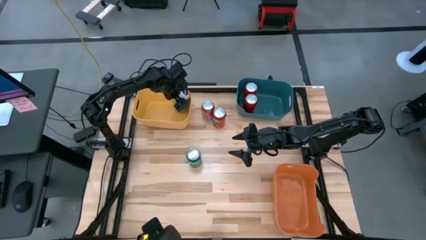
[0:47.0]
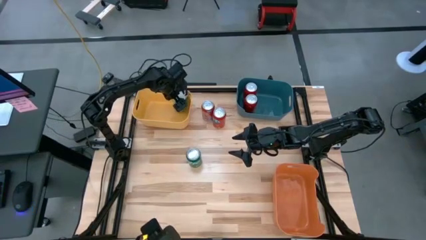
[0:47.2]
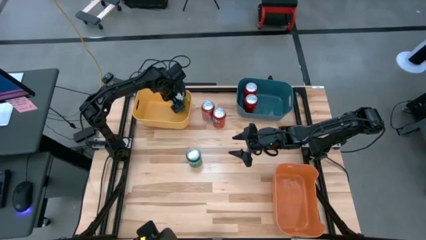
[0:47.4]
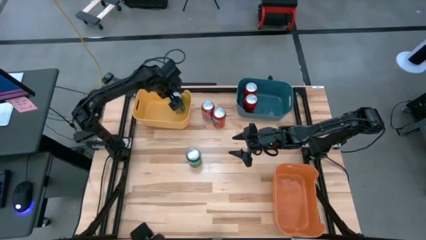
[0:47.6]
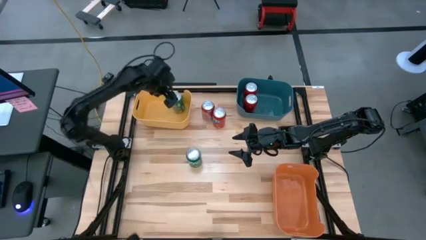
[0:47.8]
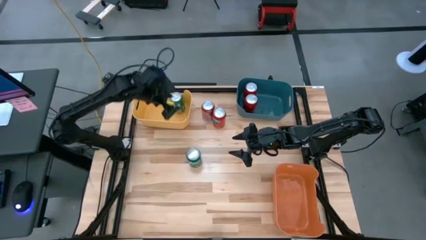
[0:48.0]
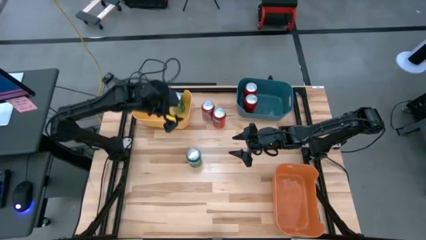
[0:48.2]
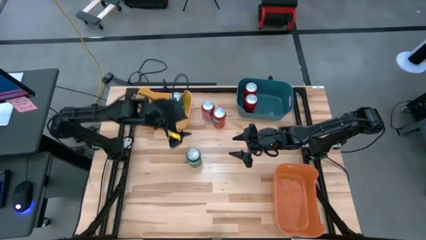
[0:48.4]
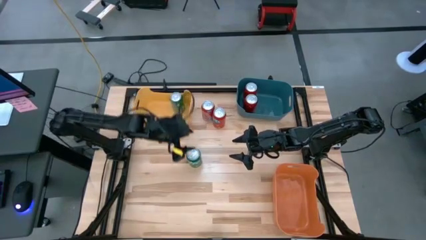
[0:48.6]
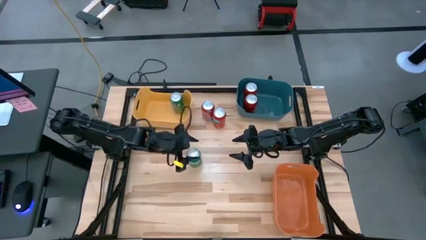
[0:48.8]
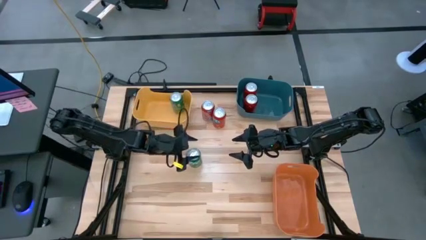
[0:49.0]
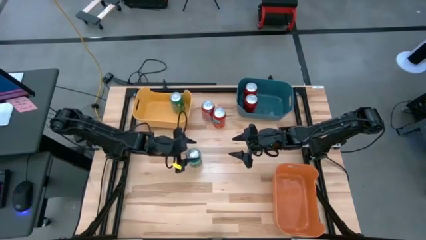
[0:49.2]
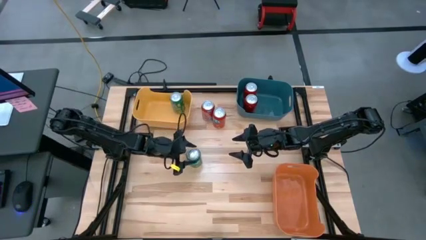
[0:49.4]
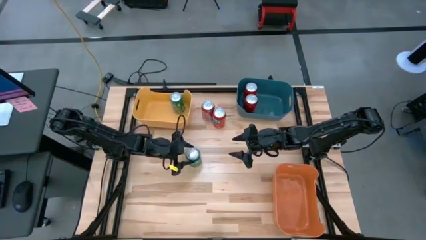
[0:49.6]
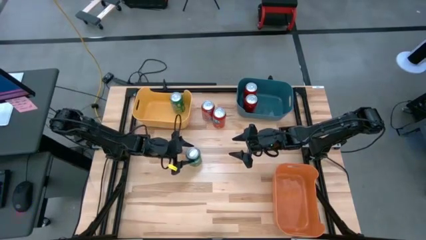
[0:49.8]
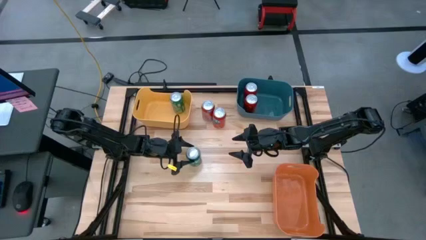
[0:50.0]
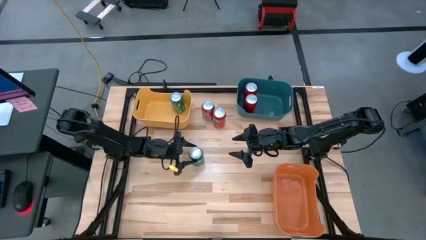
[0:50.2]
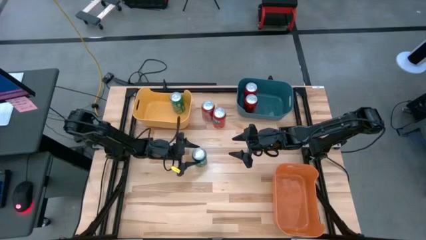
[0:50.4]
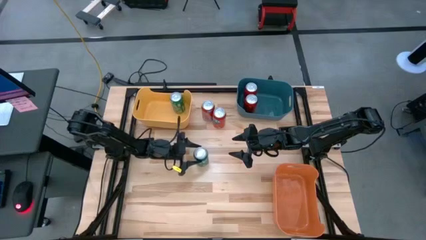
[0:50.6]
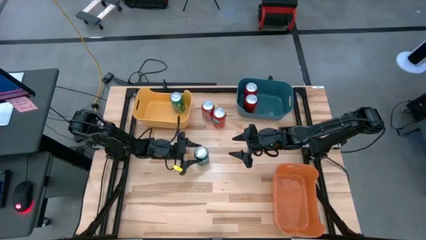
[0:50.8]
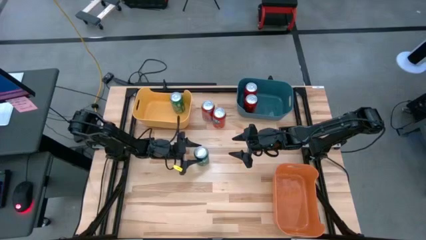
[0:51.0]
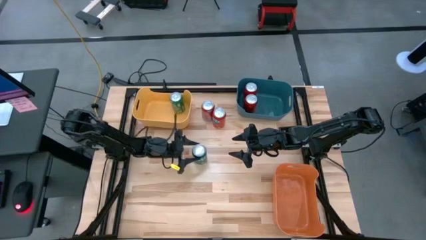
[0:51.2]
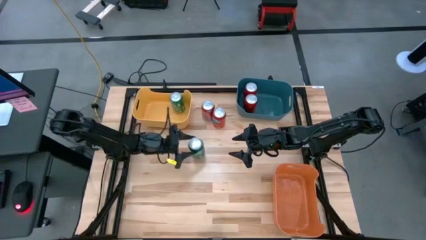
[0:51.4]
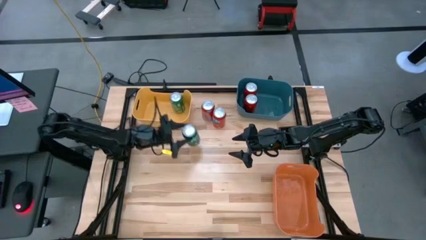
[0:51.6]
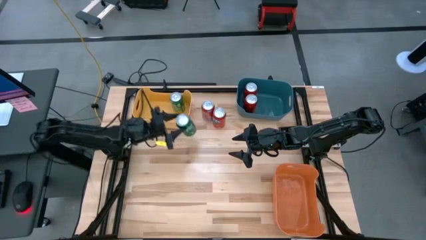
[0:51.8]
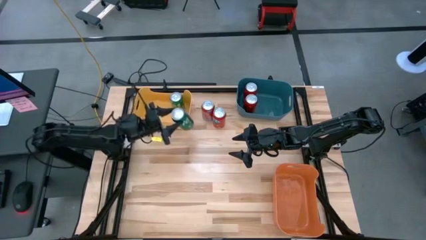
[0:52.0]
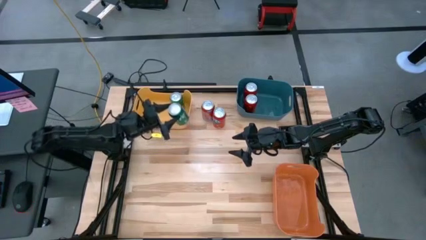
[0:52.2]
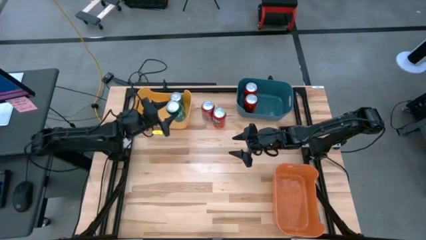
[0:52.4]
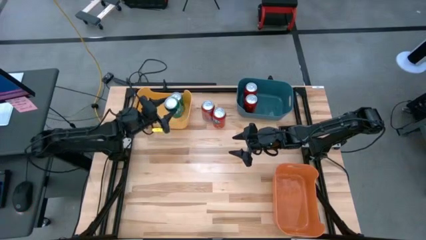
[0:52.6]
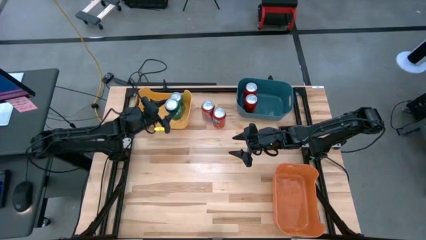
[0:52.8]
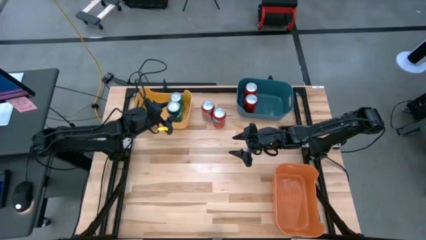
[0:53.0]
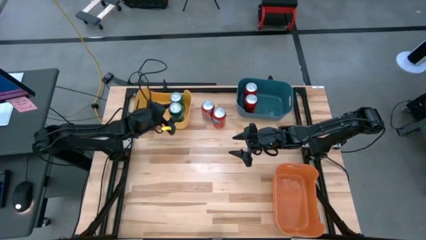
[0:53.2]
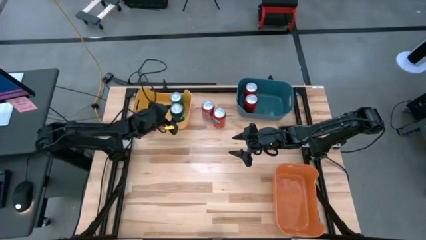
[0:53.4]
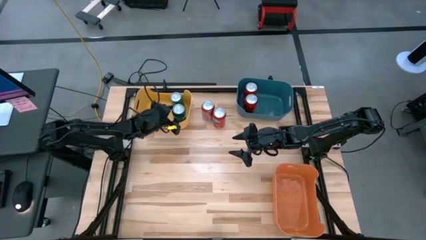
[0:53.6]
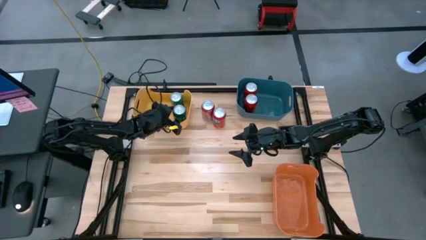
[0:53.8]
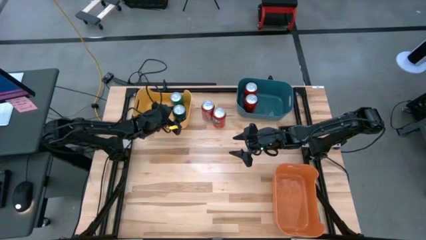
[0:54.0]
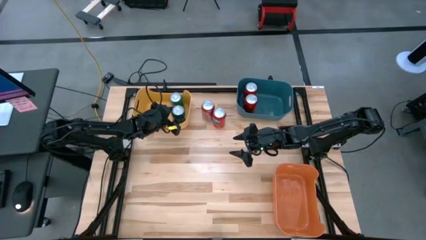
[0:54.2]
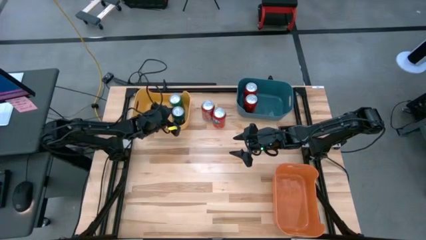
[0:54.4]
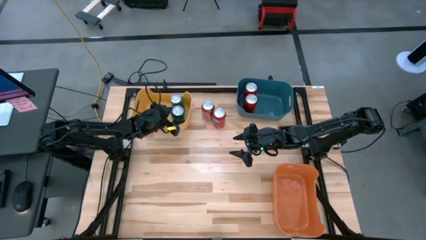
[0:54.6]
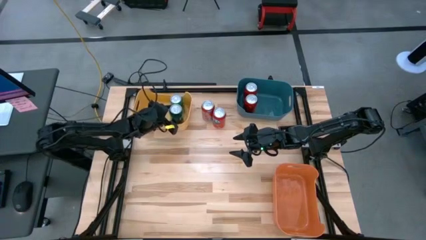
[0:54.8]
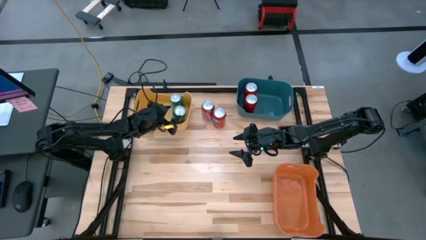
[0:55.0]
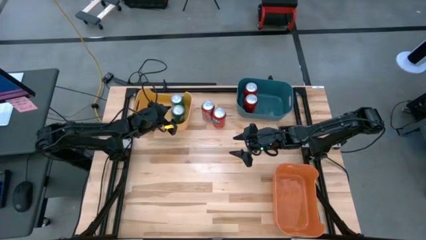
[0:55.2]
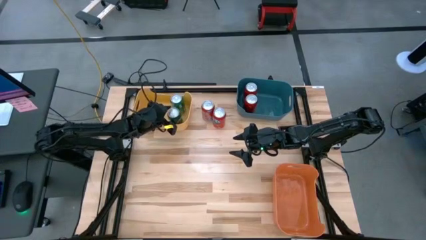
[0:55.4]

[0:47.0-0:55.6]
Task: Sort soda cans
Put the green soda can into the yellow bin

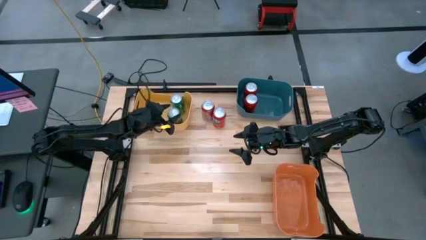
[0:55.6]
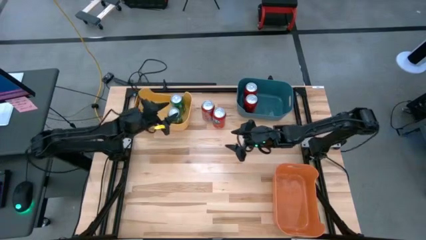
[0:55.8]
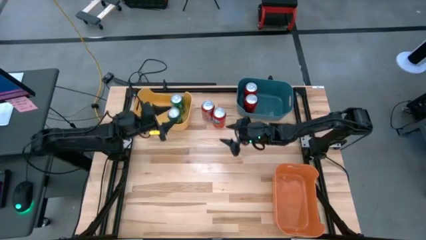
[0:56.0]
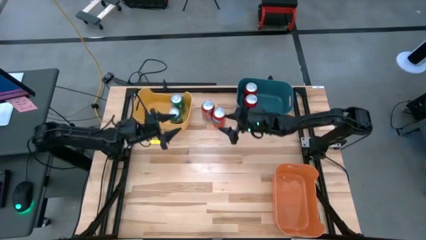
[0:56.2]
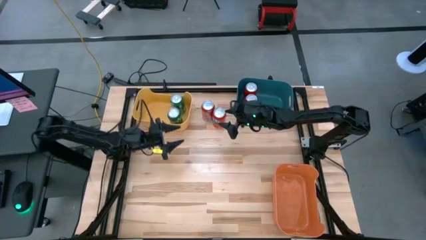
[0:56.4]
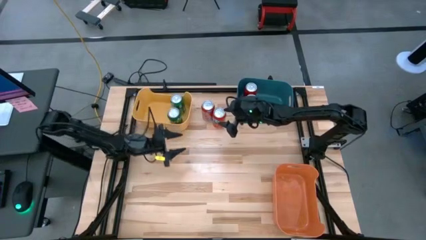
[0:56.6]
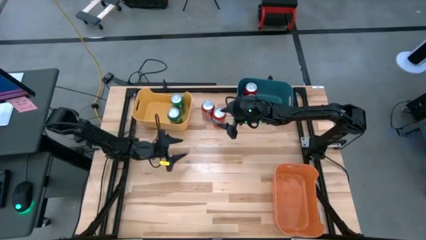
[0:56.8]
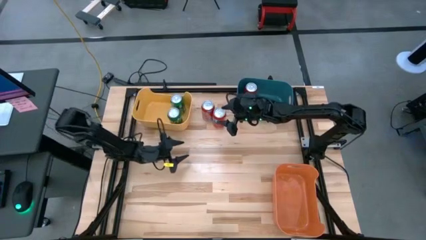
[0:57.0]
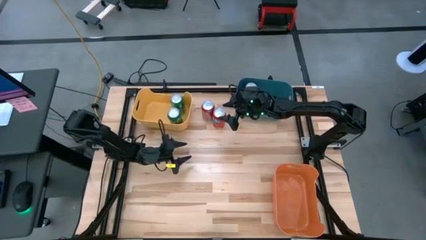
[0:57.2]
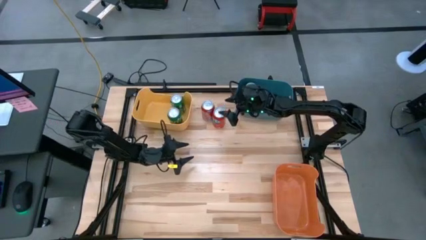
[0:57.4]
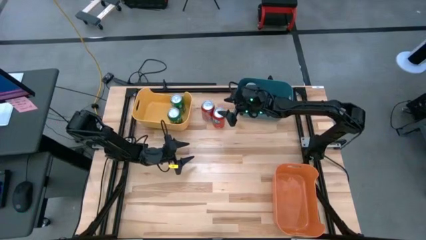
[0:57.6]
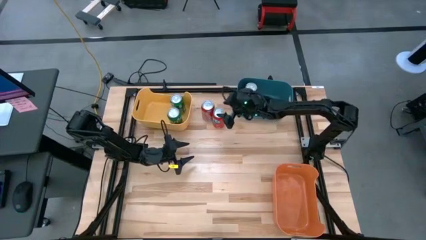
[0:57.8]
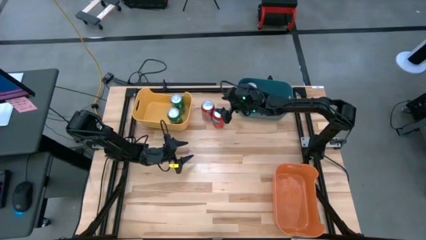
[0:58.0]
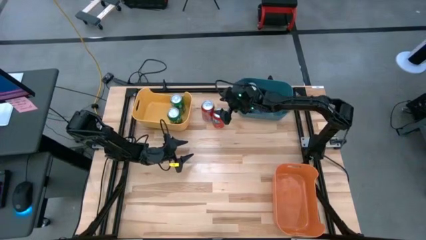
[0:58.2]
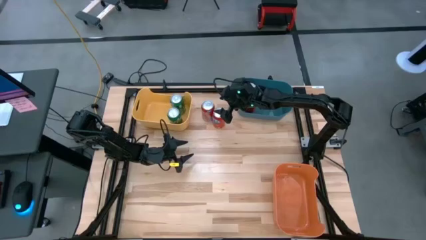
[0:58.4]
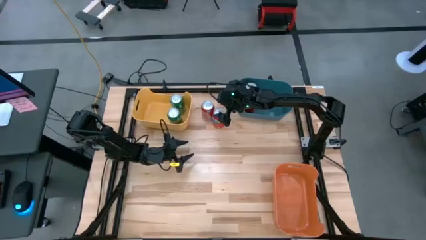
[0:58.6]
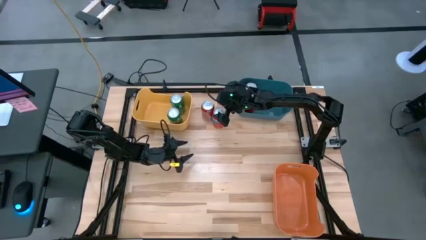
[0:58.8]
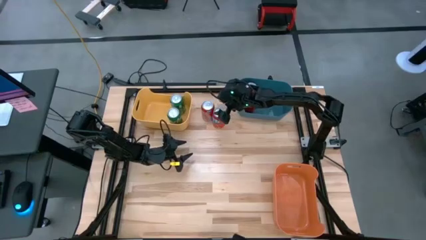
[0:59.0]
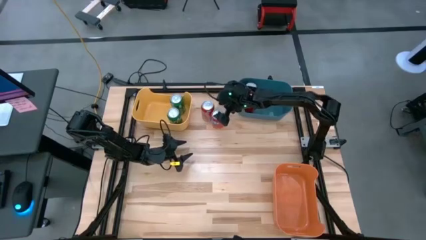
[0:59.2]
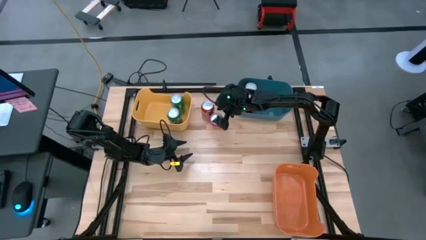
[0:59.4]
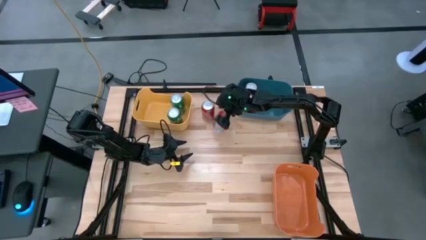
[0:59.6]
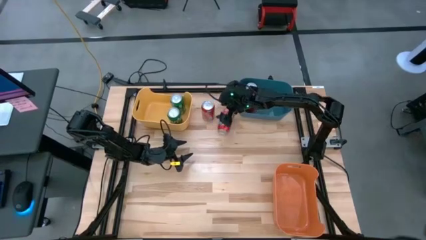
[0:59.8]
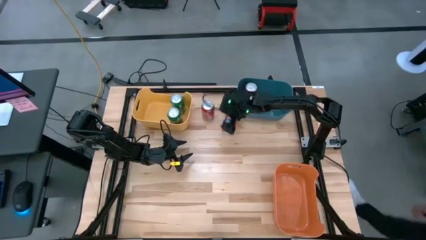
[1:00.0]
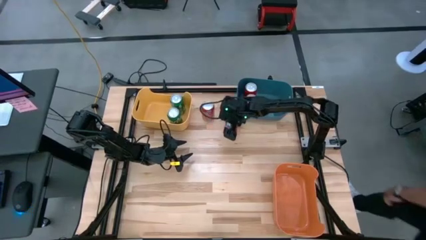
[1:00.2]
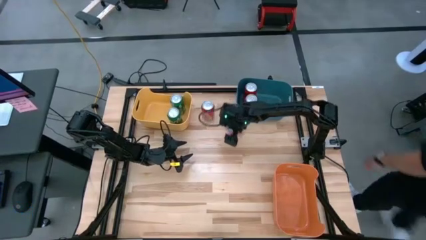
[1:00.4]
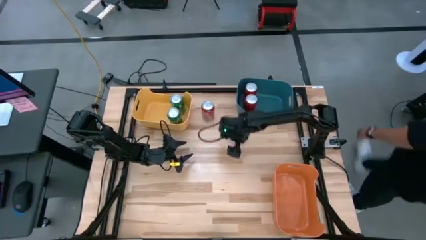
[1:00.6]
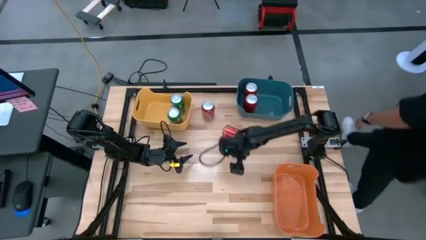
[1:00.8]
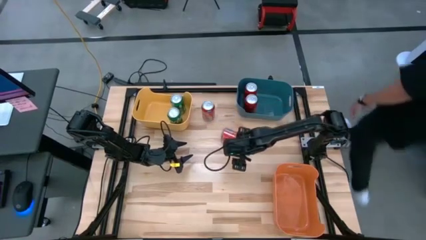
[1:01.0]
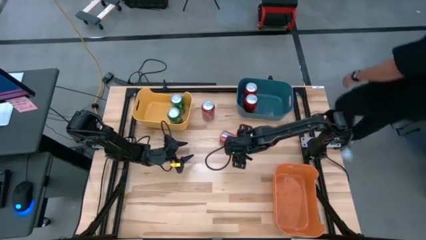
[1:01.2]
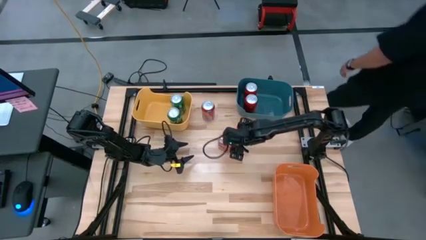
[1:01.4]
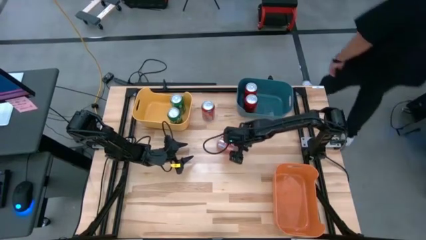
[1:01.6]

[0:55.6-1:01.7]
Put the right red soda can into the orange bin

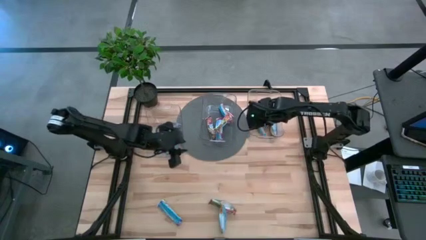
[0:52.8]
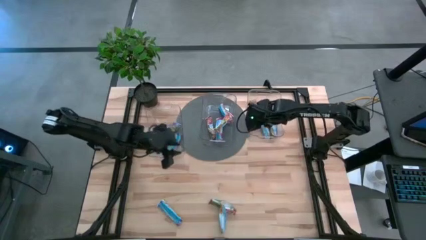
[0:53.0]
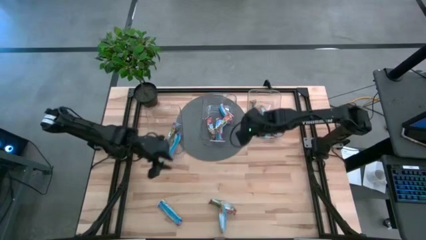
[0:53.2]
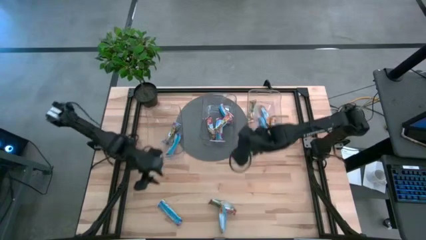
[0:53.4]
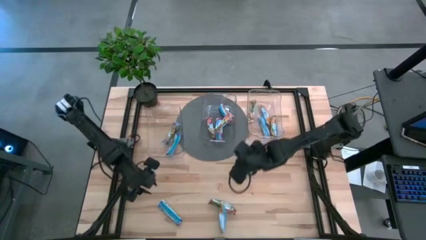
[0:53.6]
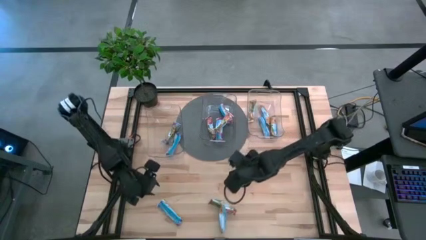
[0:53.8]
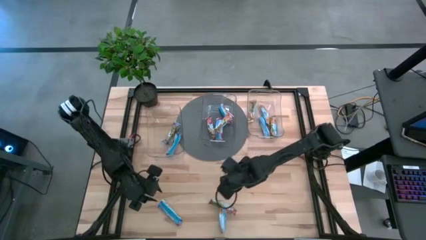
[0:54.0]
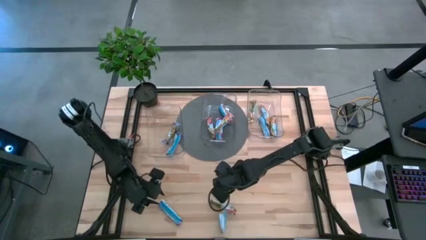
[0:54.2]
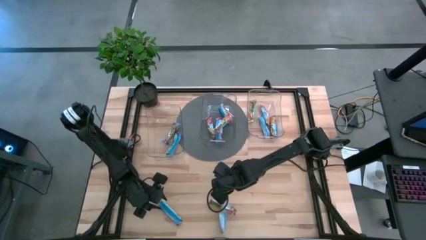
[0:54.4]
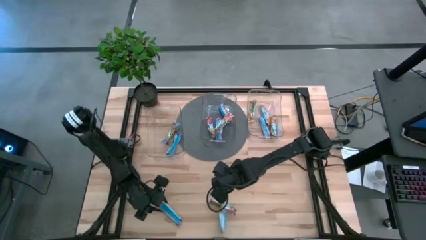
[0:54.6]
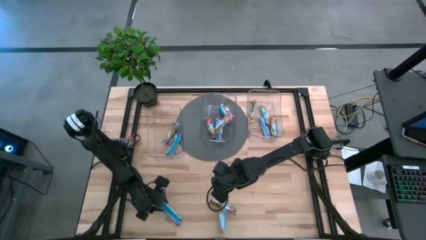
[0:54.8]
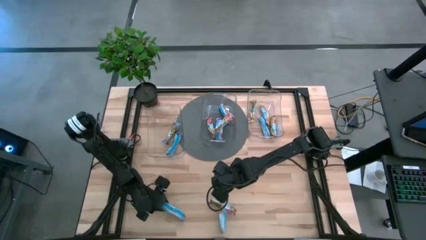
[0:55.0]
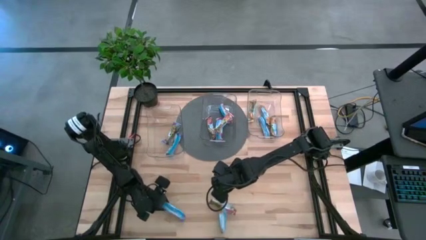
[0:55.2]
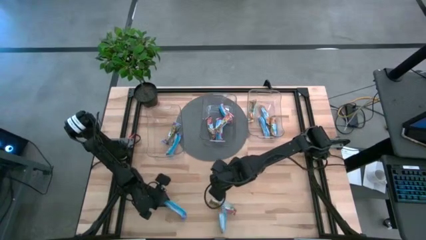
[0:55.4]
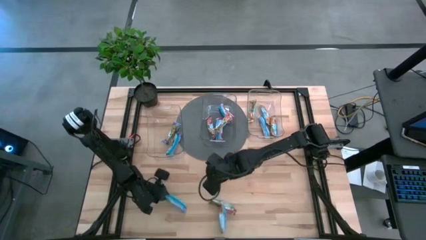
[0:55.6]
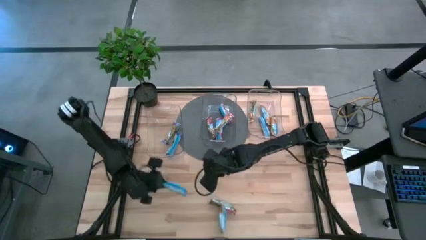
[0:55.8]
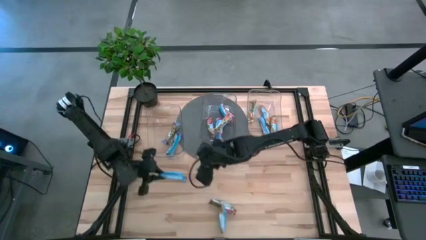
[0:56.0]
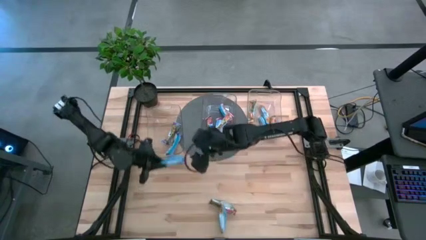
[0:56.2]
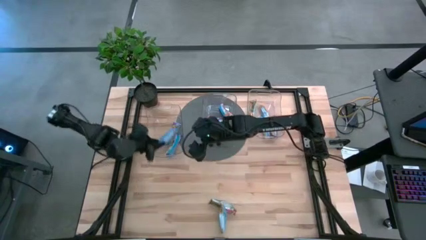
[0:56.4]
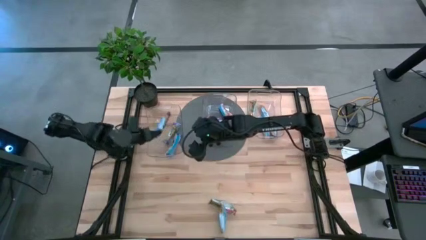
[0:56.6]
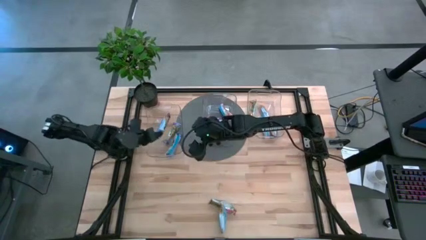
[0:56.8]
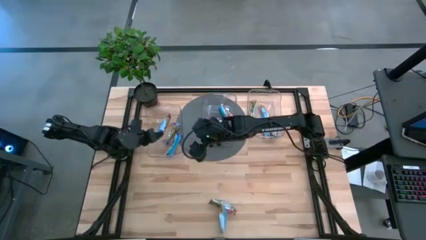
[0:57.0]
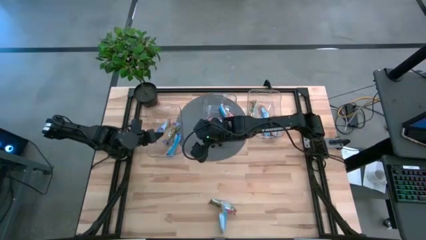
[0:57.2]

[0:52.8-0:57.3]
Task: Pick and place Granola Bars by type
Put the green granola bar into the left transparent bin
